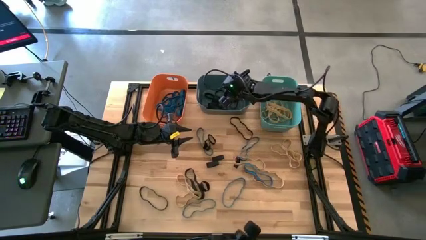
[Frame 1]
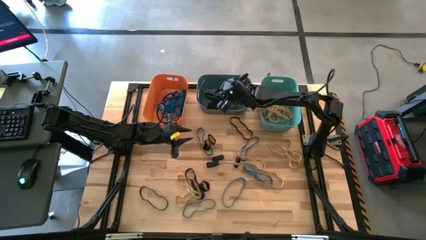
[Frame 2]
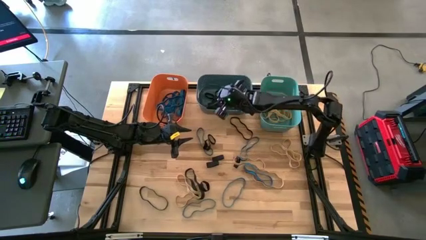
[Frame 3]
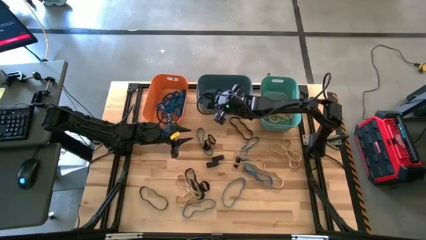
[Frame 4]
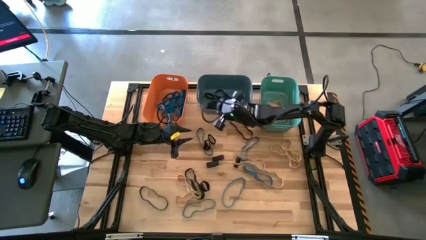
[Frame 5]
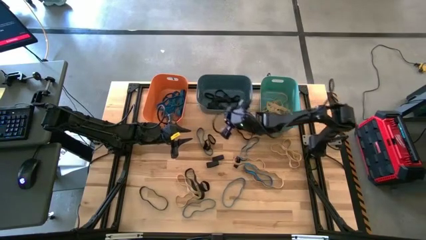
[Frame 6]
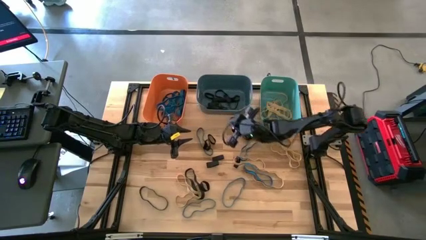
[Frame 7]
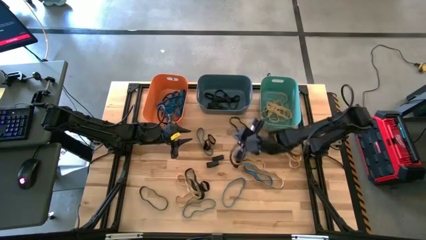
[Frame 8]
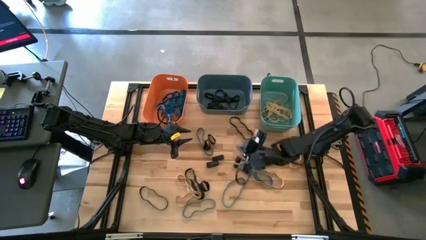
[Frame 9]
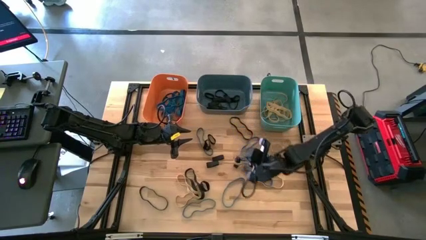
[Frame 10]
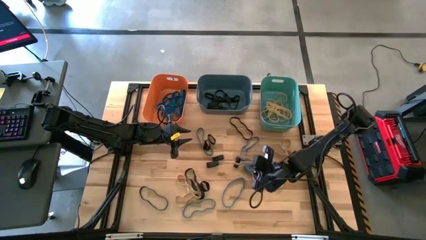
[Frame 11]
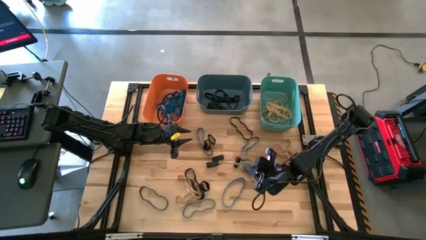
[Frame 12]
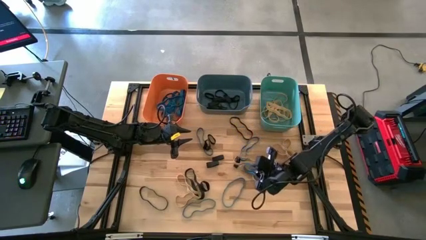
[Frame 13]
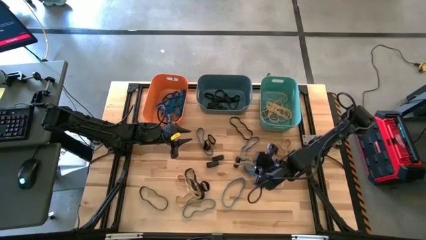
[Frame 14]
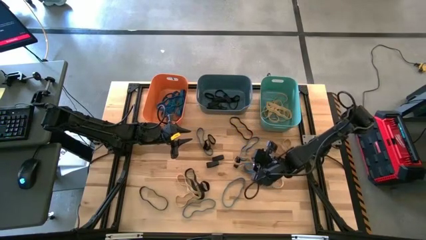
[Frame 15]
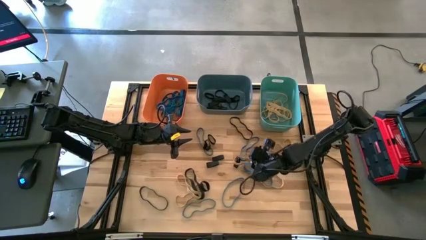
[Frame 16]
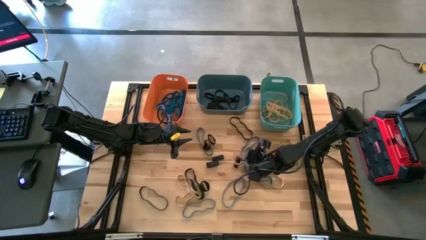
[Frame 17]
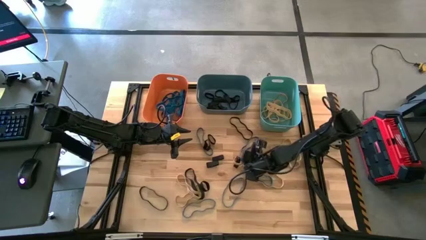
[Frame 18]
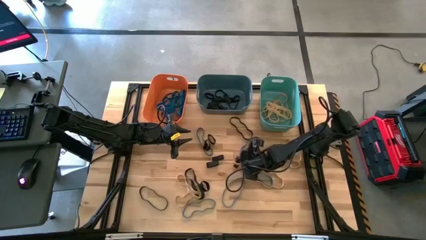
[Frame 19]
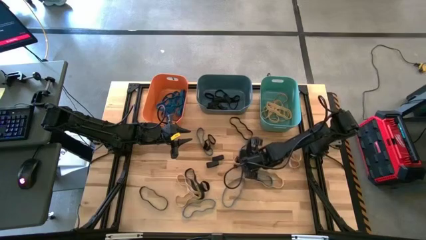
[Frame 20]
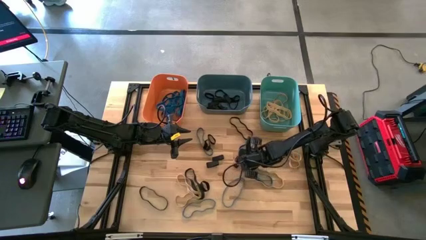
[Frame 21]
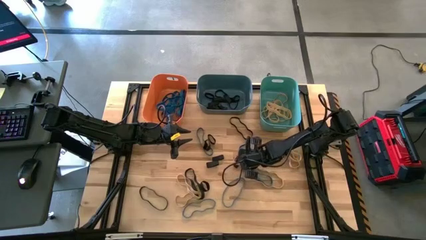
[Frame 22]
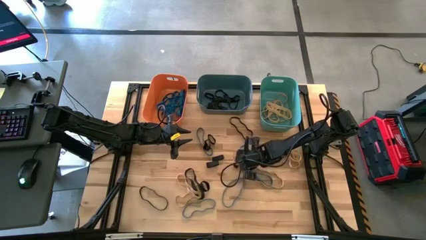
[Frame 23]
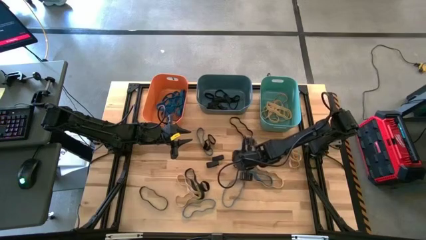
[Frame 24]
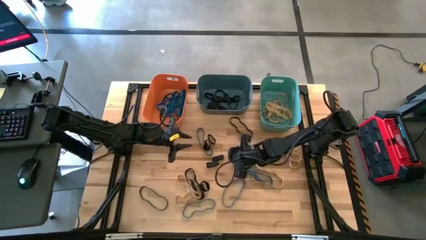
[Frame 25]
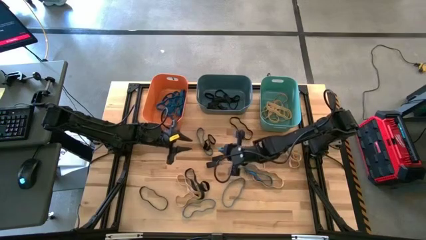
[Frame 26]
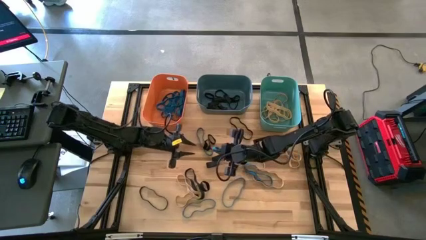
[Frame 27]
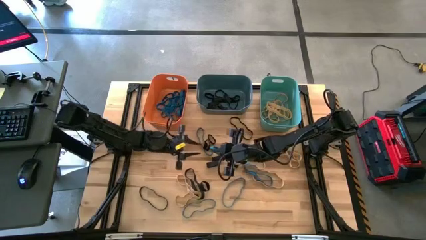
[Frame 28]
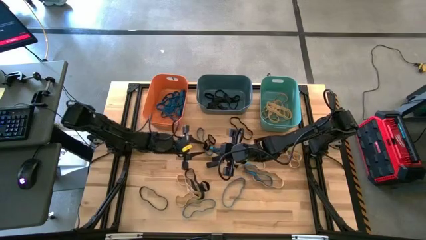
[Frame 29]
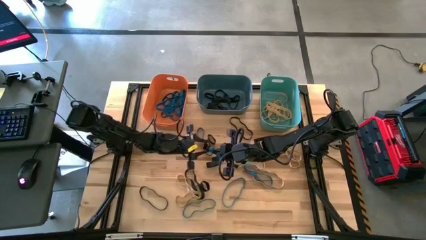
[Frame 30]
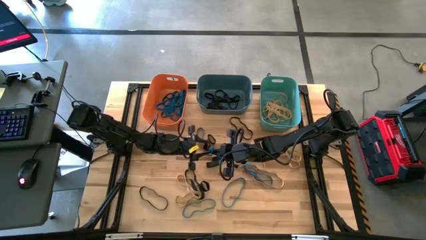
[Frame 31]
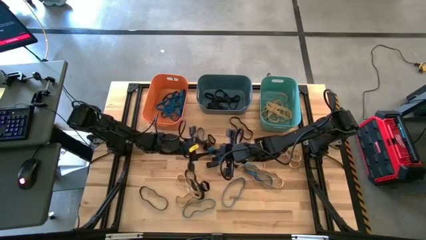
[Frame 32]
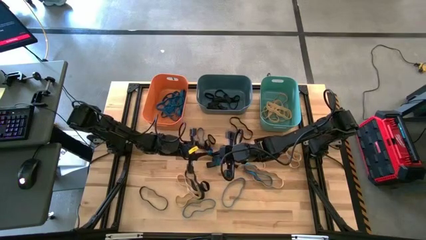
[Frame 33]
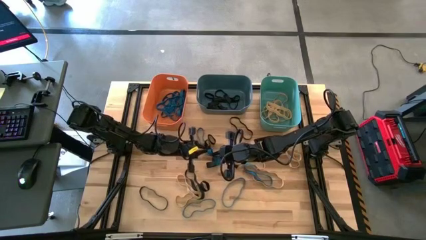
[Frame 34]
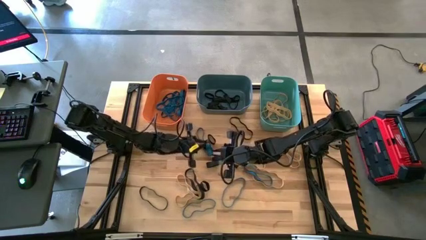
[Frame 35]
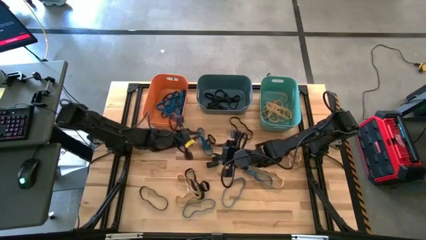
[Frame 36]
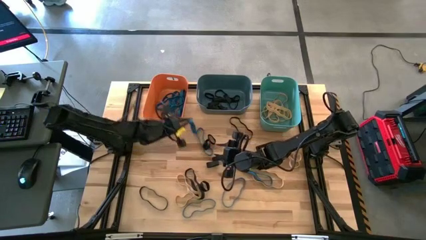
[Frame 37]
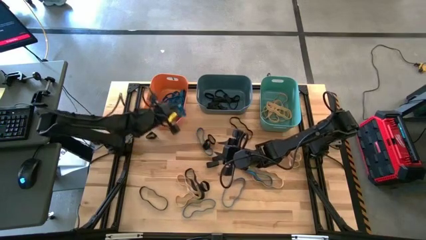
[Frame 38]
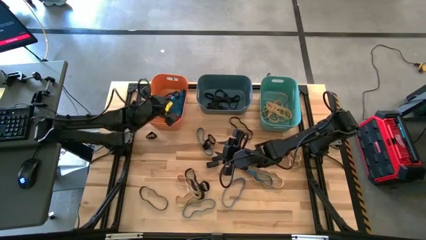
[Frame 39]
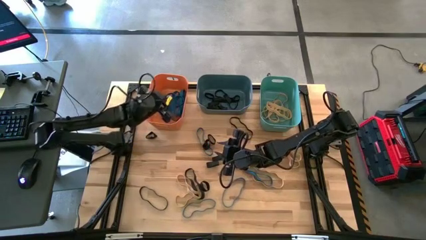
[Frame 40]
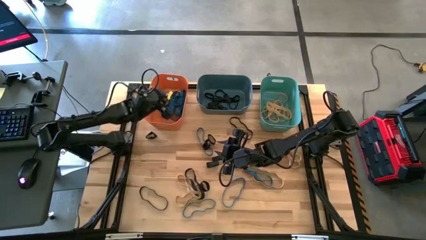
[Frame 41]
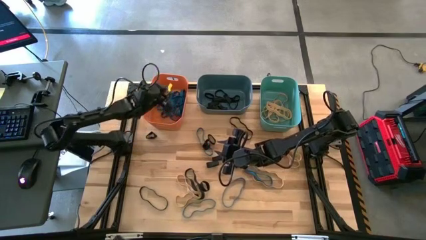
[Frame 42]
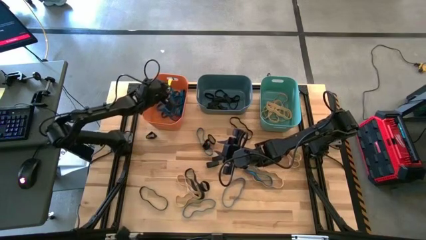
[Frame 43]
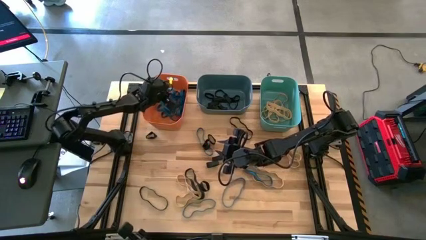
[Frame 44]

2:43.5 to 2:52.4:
Task: Sort rubber bands into baskets
Put the blue rubber band into the orange bin

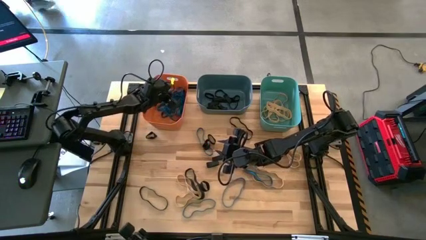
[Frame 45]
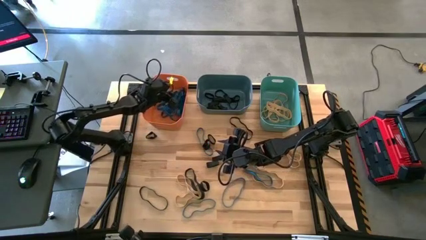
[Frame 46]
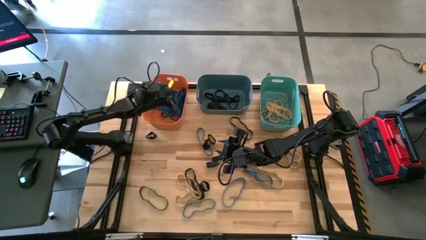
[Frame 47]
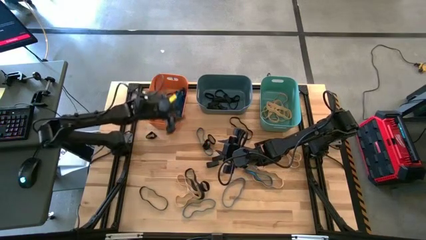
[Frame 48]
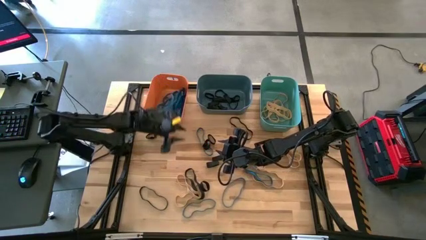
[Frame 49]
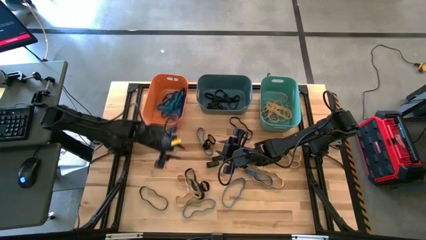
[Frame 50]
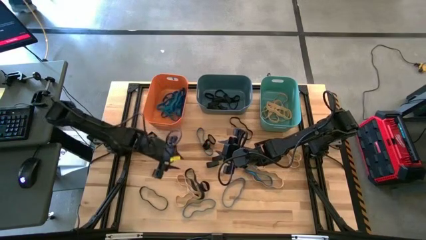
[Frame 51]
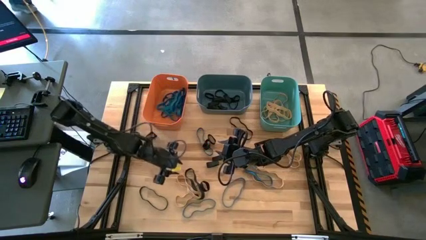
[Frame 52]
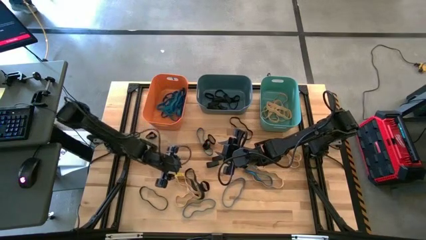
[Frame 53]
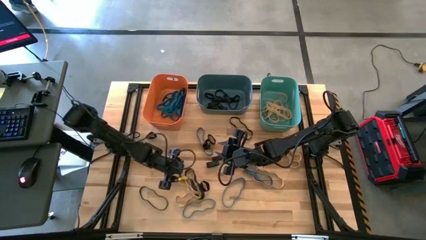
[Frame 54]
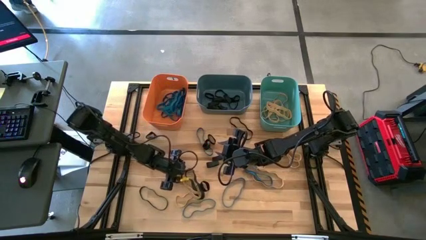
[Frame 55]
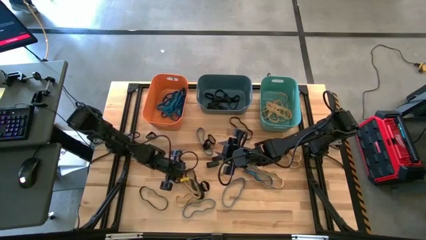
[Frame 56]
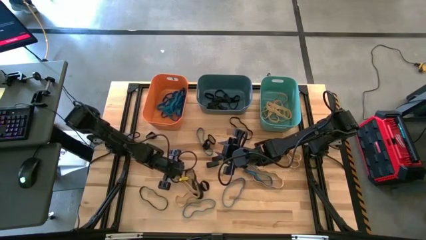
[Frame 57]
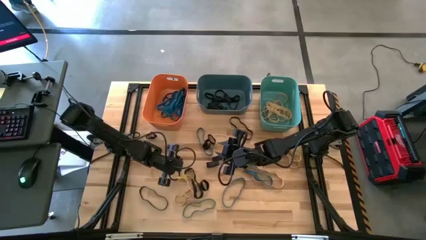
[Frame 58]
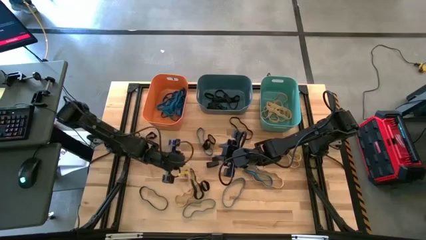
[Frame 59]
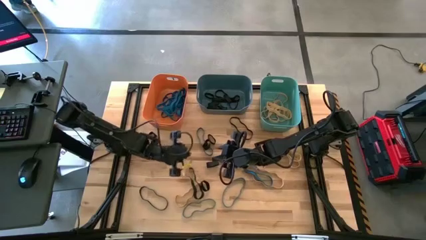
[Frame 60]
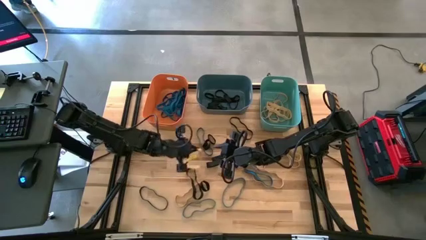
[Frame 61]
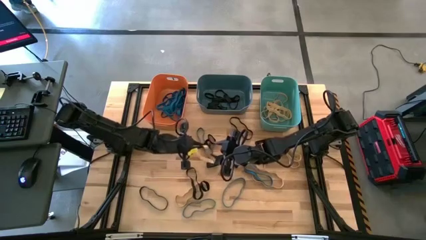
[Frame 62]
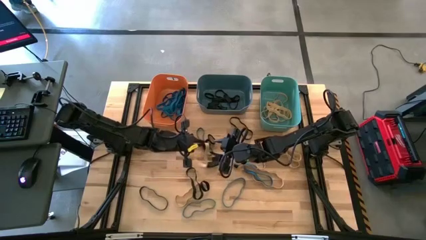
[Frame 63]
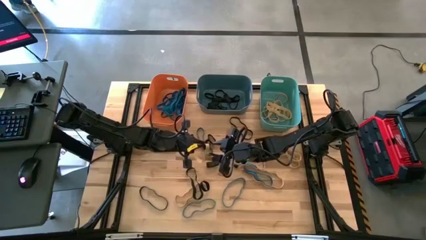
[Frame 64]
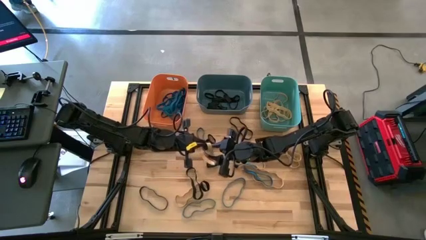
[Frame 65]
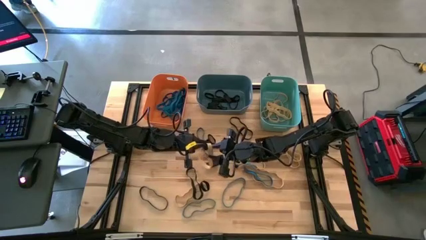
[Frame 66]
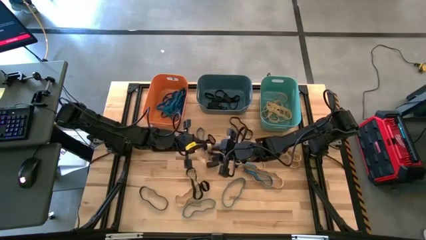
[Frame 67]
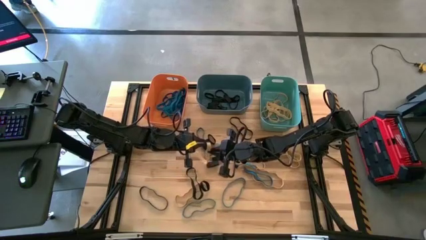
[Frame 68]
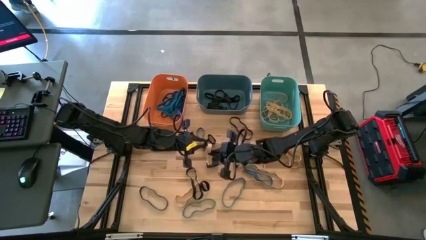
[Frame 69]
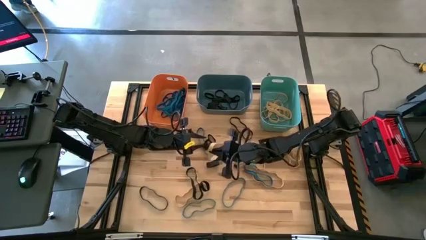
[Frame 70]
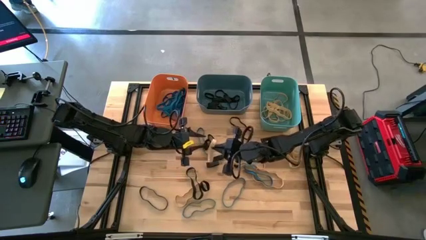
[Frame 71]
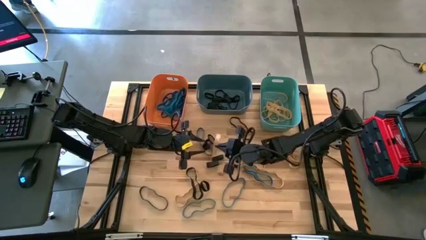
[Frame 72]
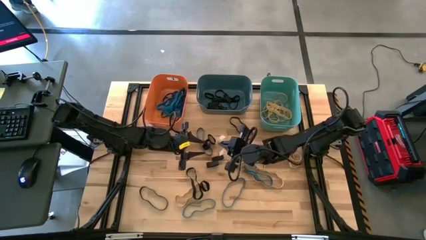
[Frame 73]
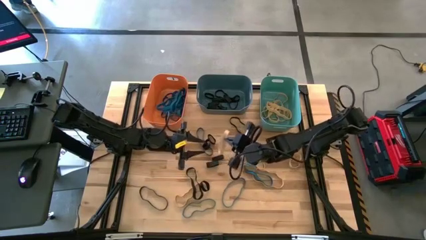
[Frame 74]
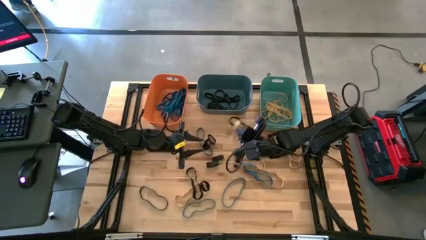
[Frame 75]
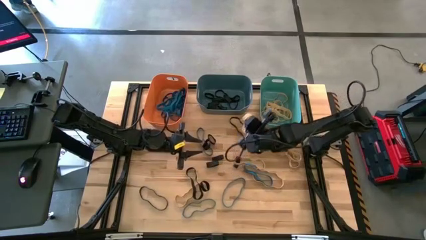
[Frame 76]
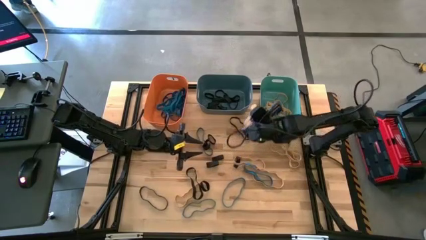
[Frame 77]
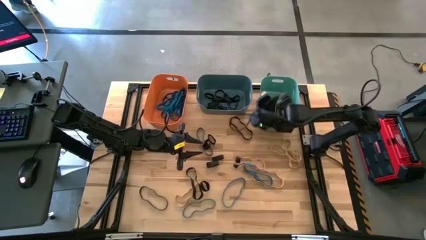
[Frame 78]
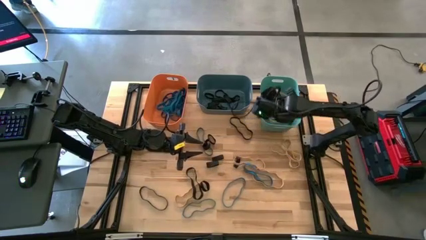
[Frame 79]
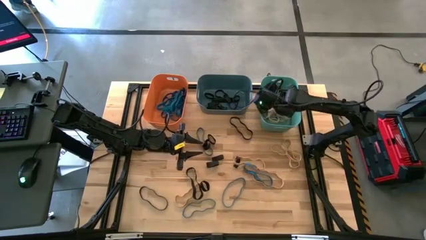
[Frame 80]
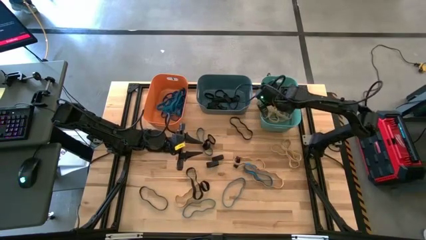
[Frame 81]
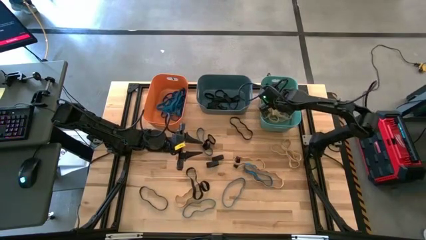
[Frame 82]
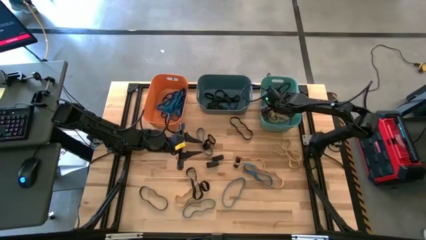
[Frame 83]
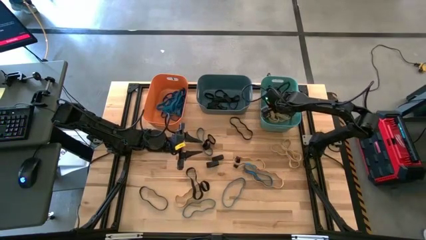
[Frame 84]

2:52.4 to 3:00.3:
Put the brown rubber band into the green bin

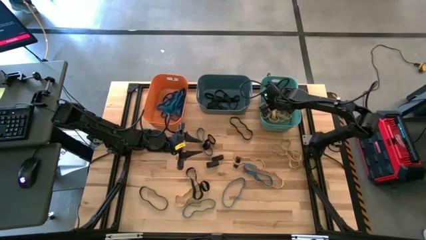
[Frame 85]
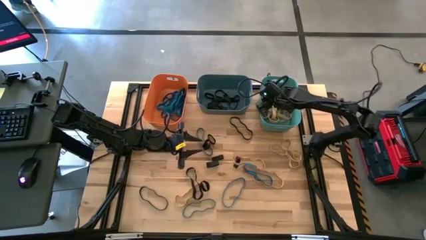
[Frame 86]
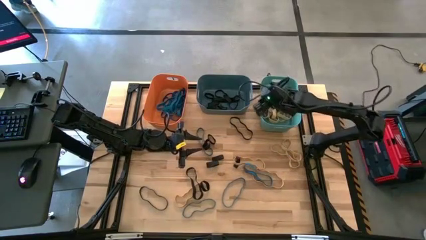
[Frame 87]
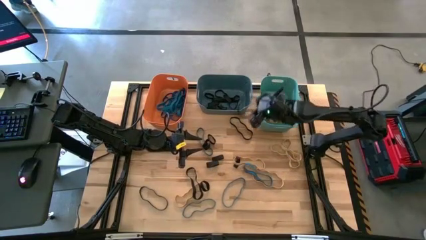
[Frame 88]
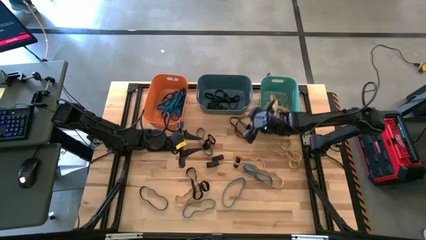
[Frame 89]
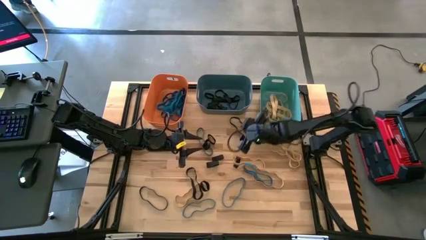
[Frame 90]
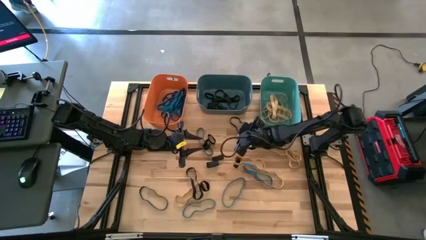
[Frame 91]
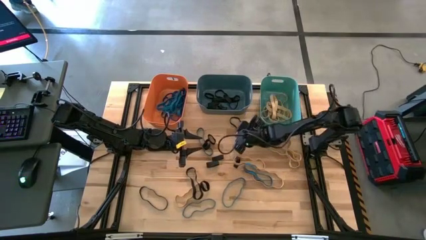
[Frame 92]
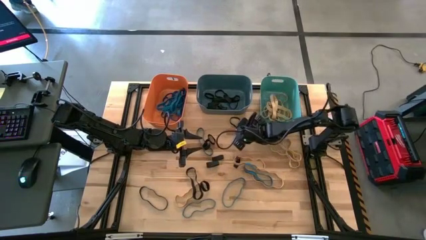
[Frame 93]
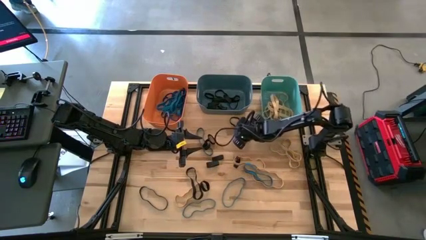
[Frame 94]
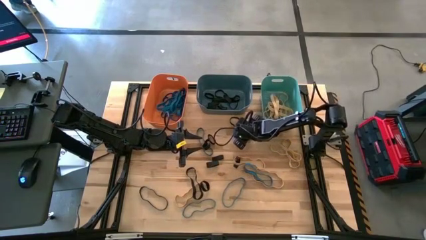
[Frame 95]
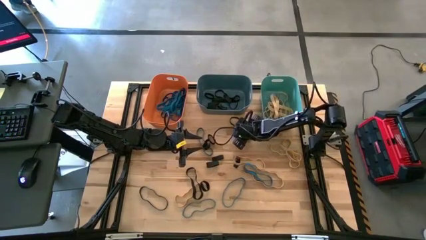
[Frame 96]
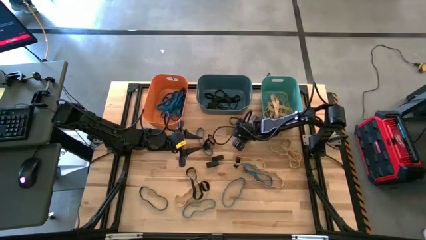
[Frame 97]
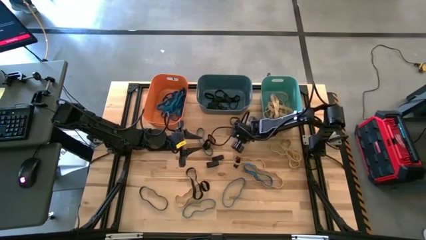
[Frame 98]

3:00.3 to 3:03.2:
Put the black rubber band into the blue bin
